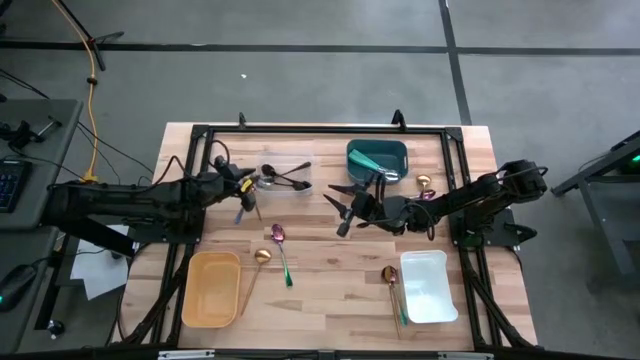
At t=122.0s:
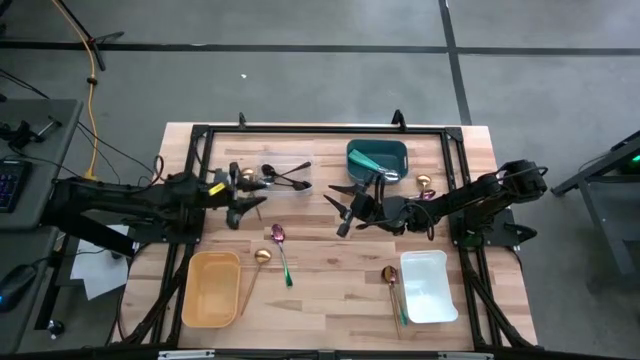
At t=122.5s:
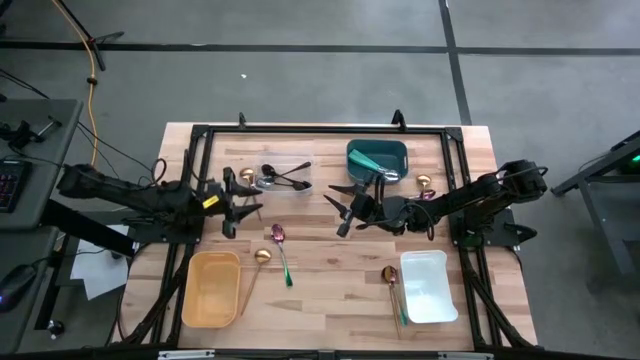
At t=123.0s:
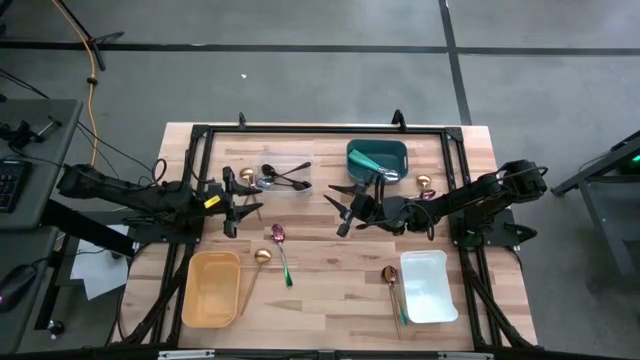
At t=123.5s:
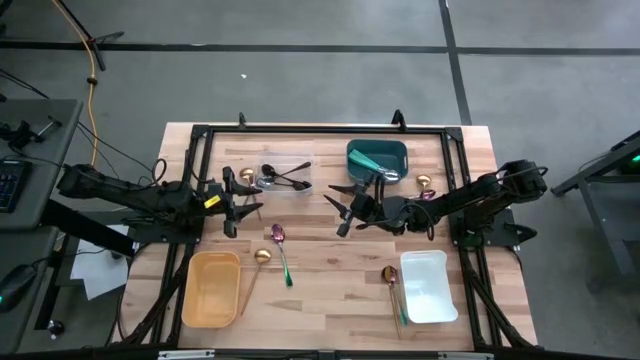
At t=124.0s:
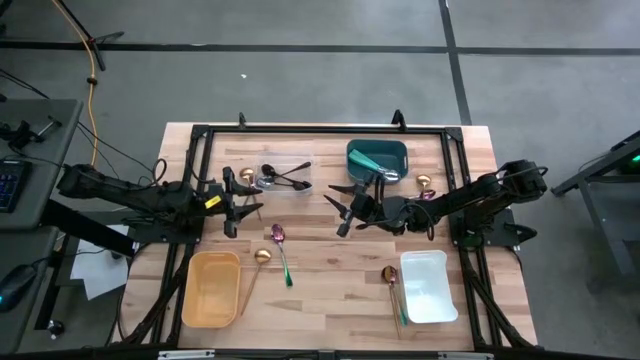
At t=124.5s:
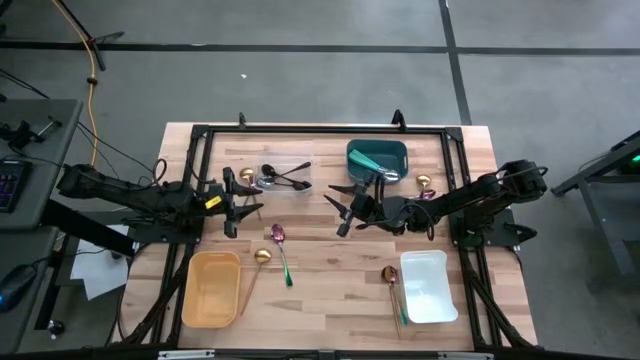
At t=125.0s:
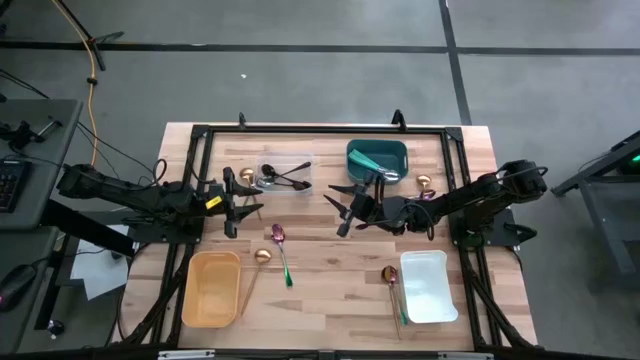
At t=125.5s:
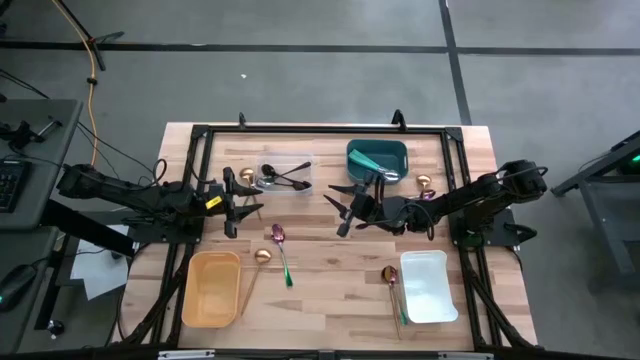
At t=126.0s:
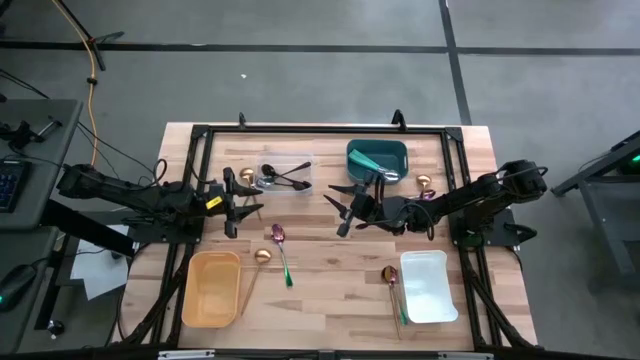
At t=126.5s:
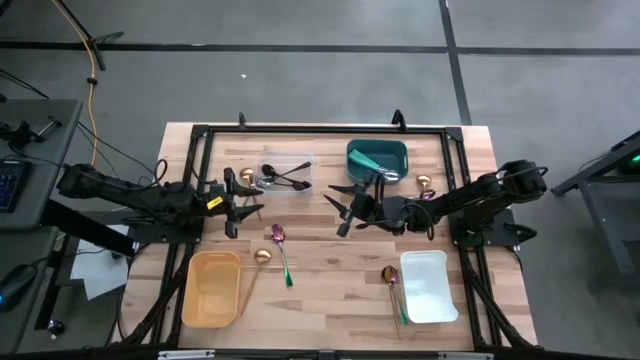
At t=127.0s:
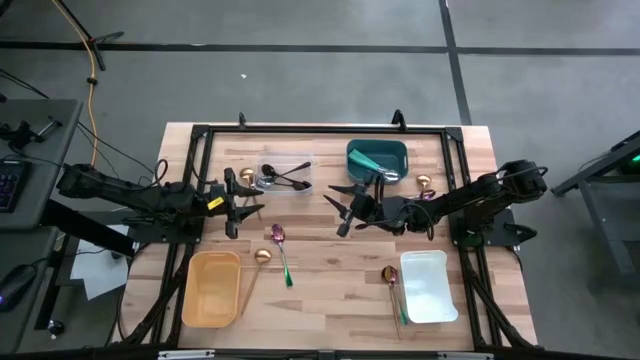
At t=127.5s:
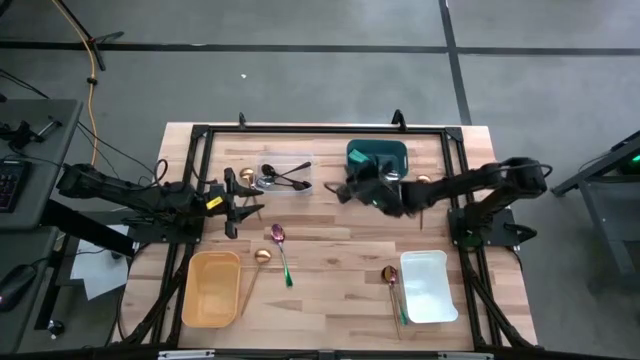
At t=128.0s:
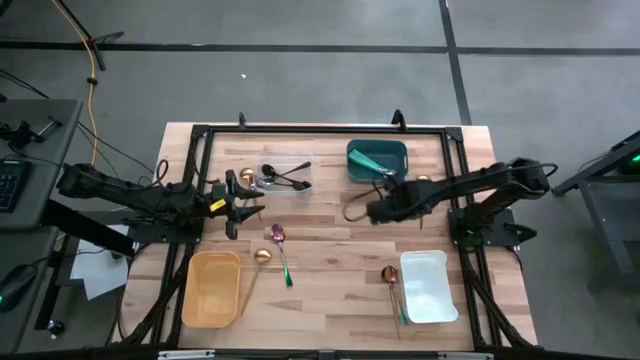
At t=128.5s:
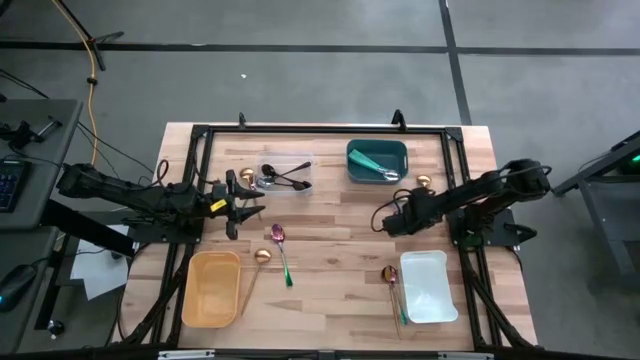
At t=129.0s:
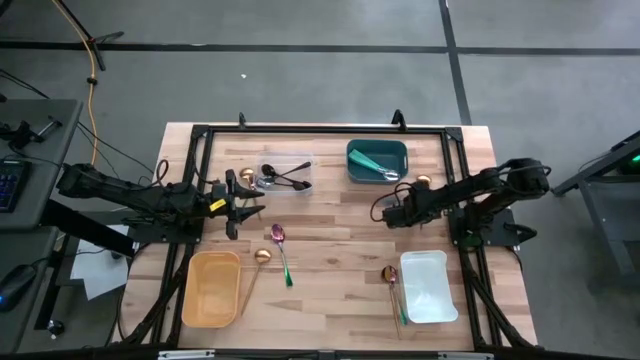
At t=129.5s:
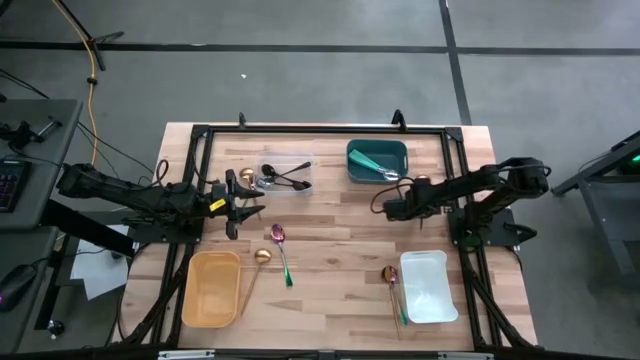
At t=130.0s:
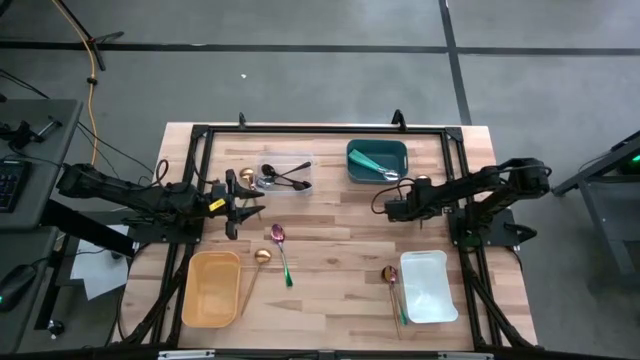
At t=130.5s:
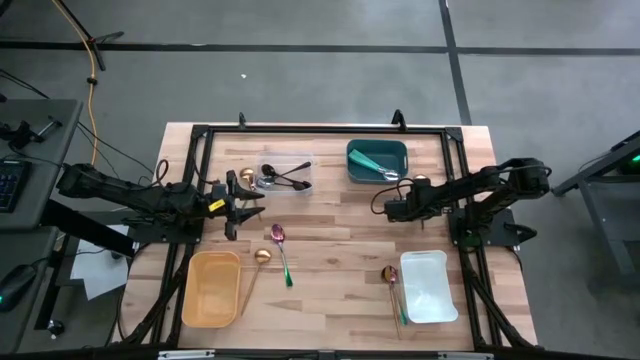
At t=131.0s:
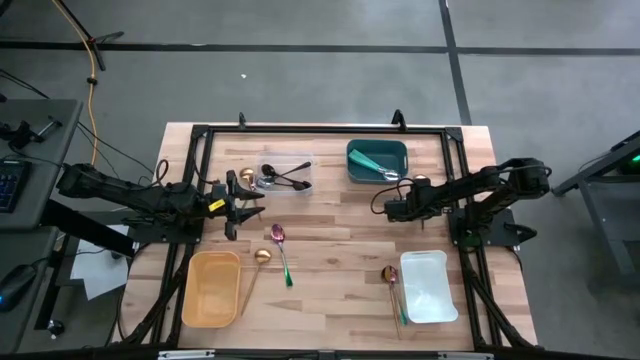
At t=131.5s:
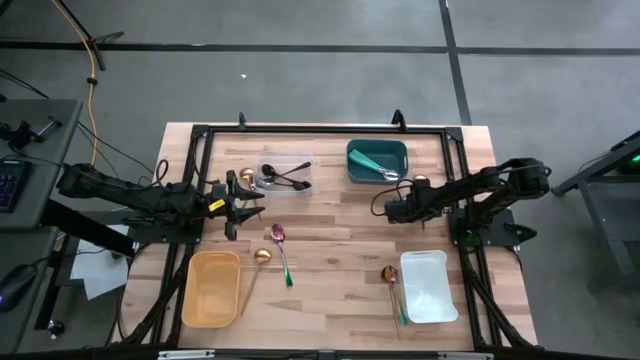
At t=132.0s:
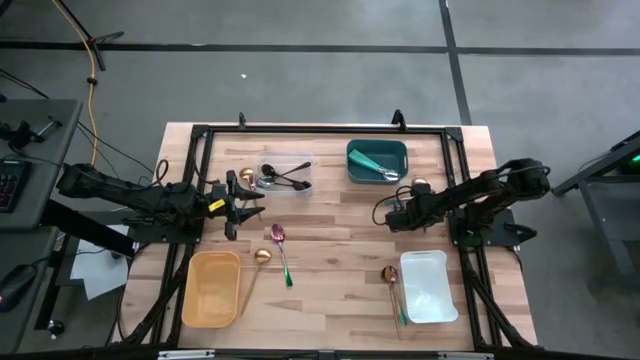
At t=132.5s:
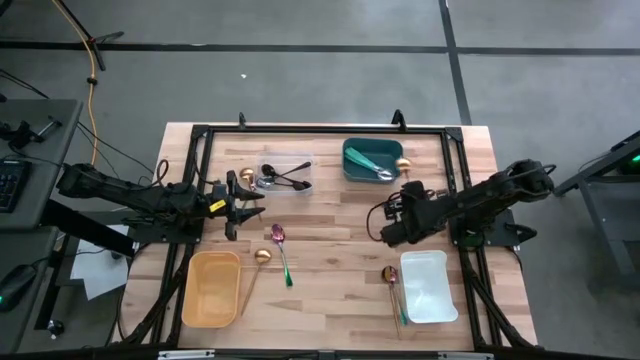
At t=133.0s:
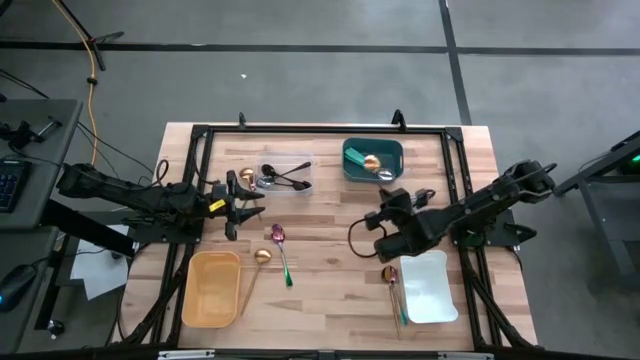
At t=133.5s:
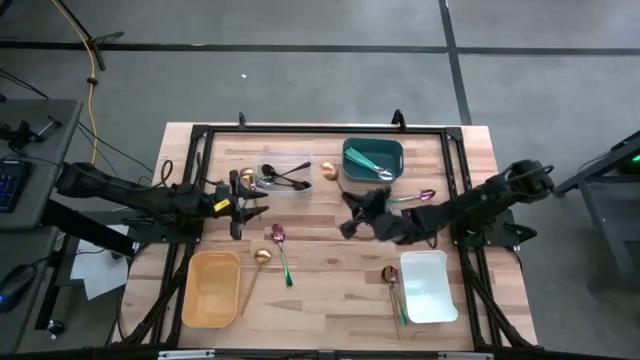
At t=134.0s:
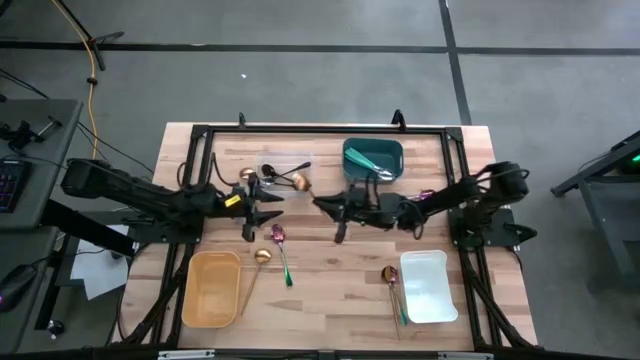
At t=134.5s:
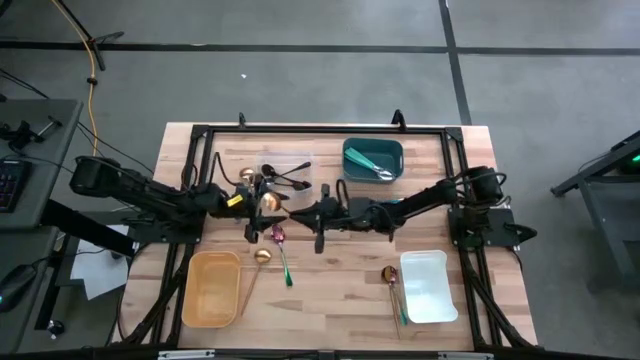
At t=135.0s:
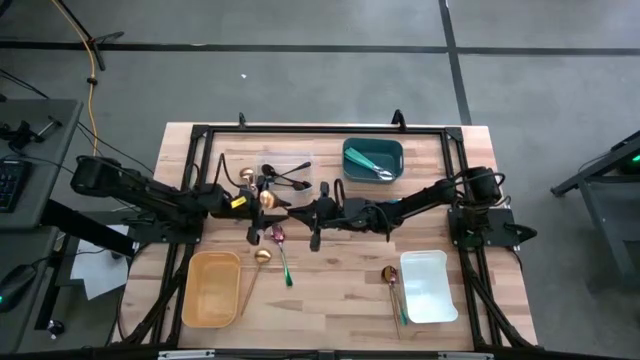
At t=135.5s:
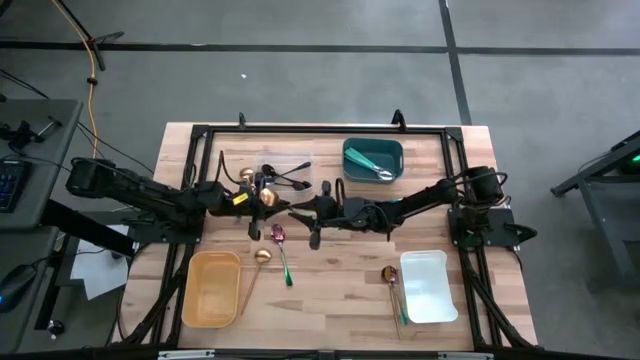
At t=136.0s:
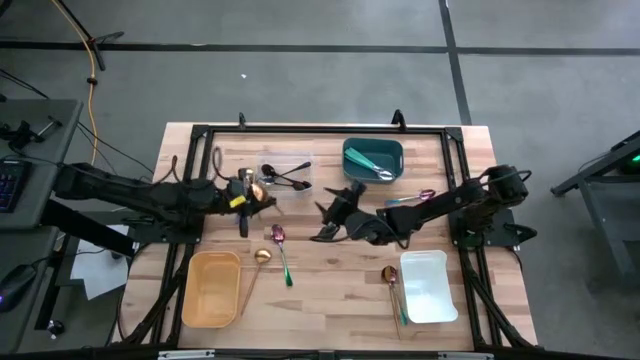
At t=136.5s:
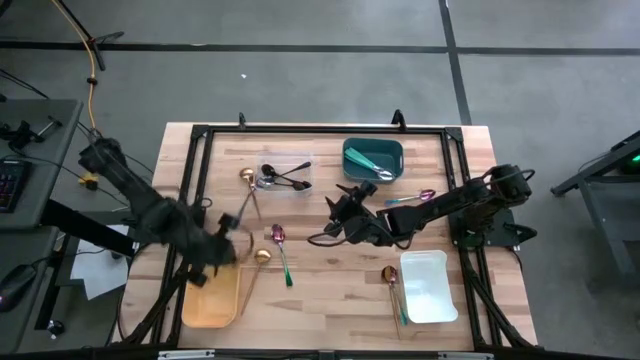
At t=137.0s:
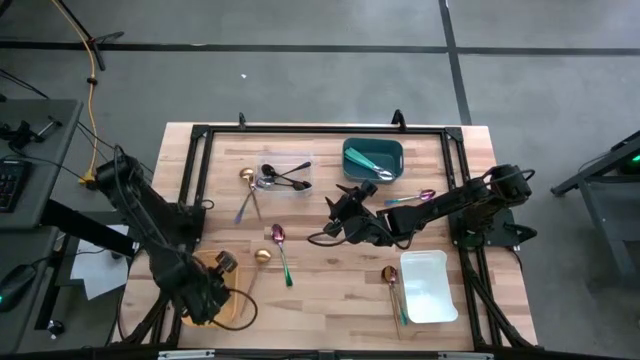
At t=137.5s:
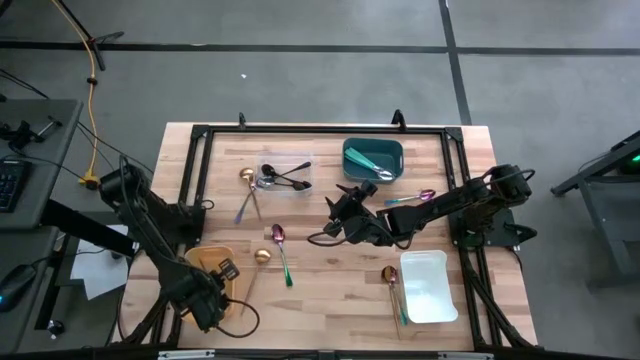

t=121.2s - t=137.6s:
Task: Sort silverware by color (type)
Put the gold spoon into the yellow bin

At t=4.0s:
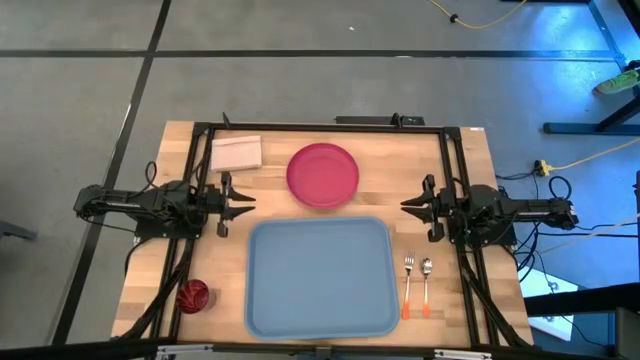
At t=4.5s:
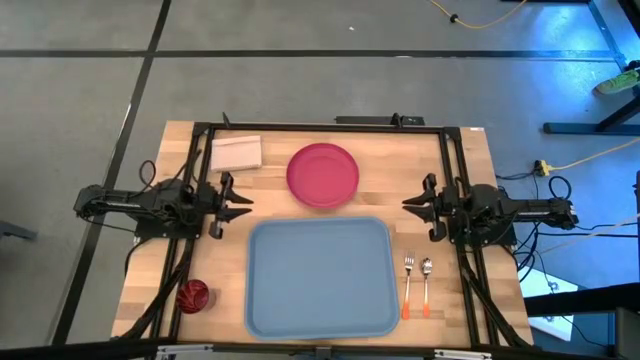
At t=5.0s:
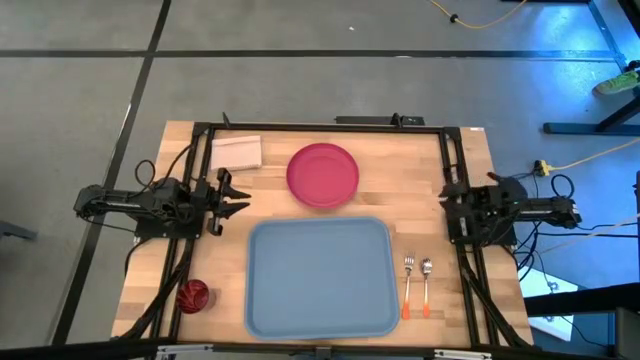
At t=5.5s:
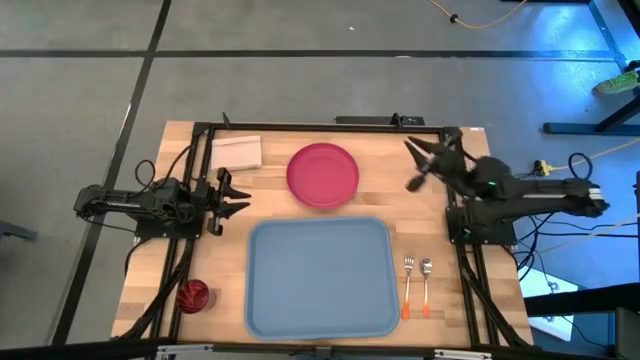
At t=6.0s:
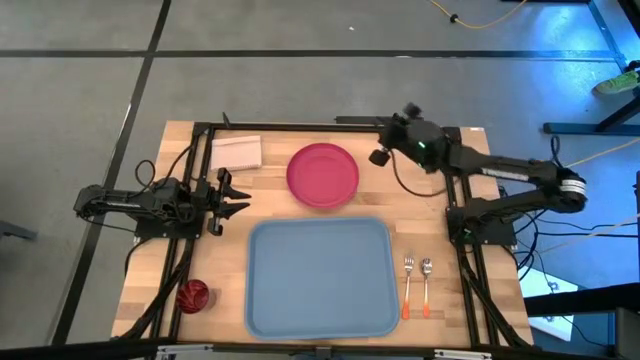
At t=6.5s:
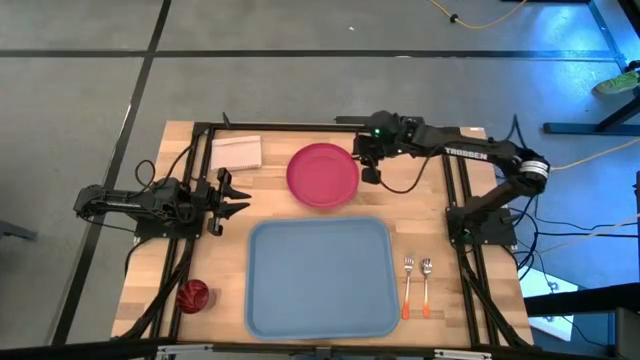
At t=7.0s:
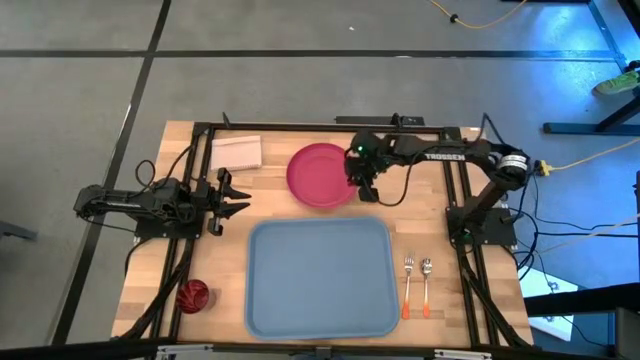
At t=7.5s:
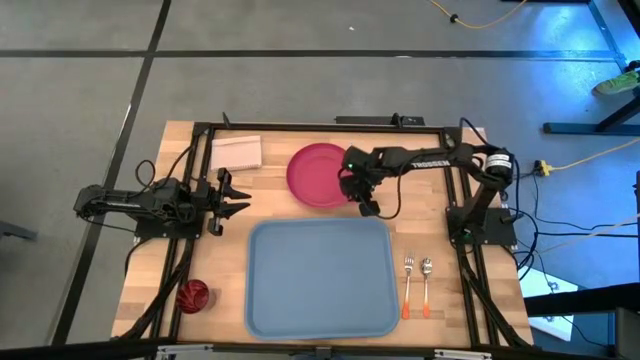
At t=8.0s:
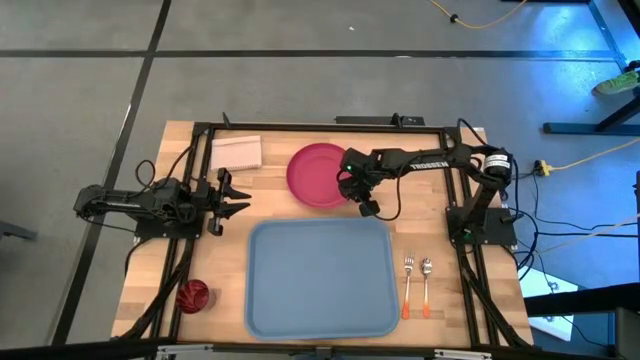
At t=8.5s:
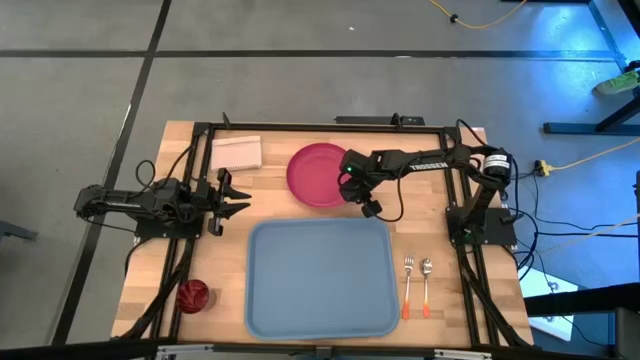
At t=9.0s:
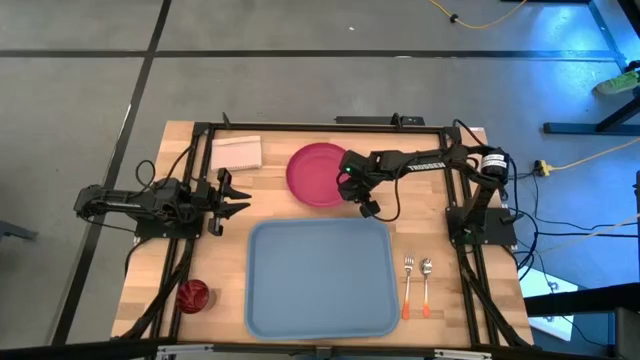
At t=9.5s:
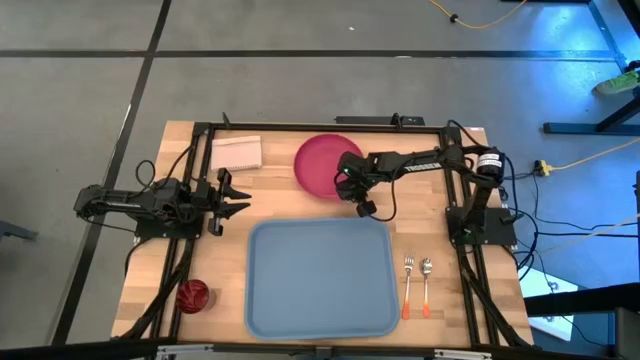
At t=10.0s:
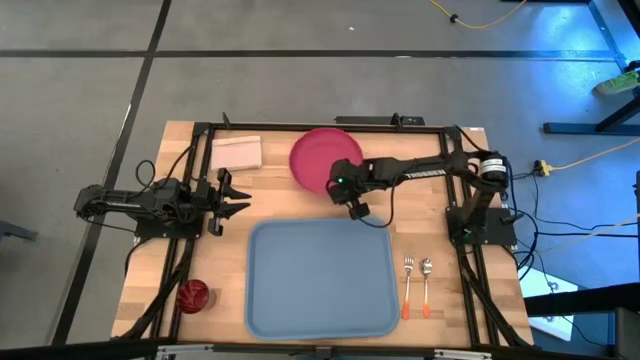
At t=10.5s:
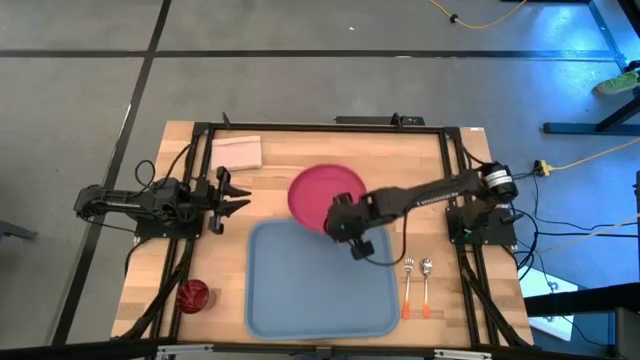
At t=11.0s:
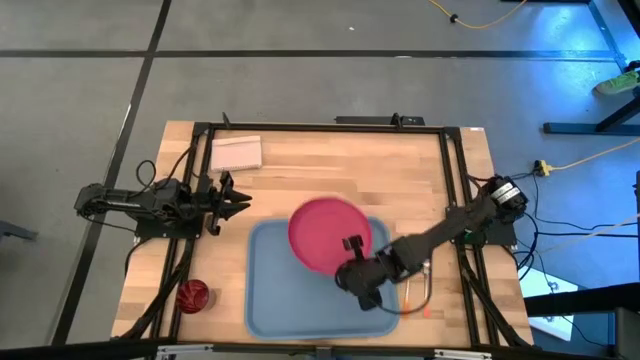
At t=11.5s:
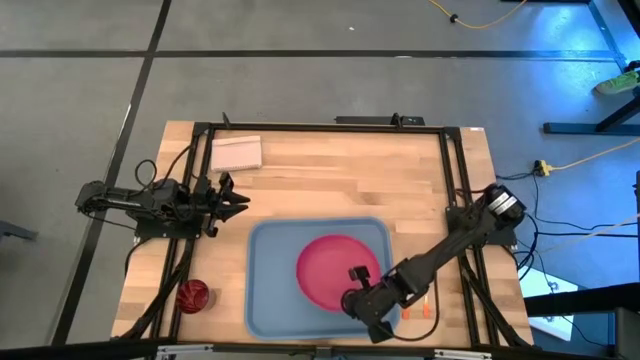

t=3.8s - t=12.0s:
Task: Pick and place plate/cup/fork/spoon on tray
Put the red plate in the center of the blue tray
